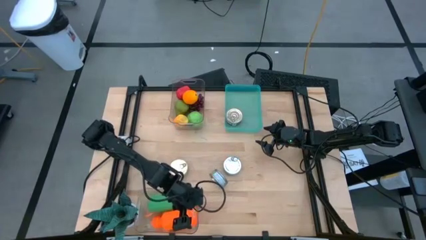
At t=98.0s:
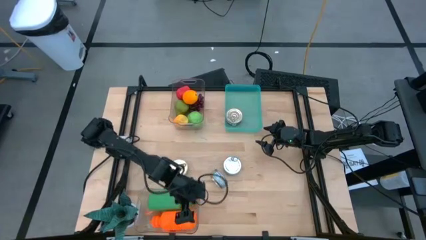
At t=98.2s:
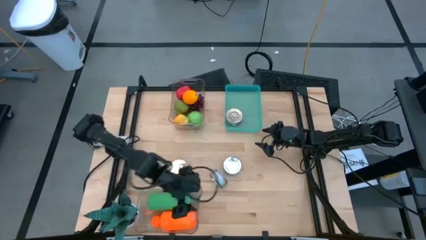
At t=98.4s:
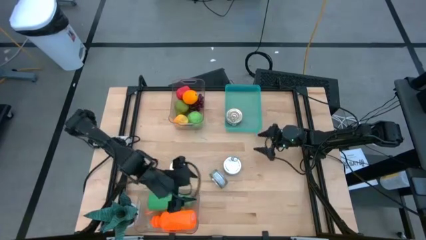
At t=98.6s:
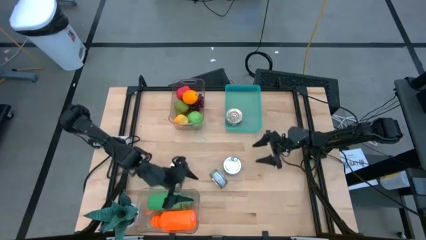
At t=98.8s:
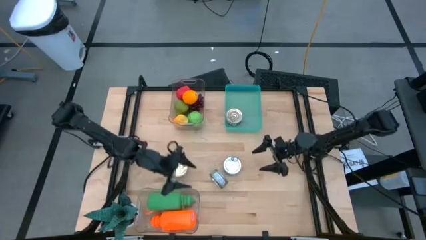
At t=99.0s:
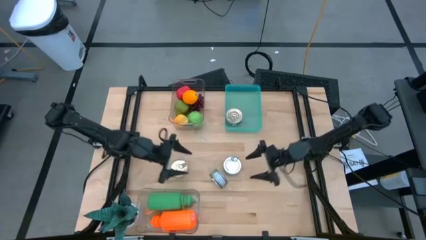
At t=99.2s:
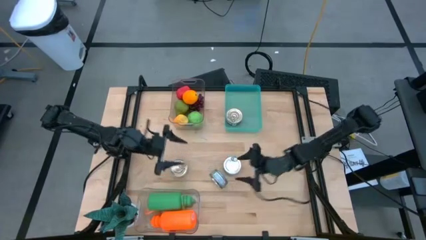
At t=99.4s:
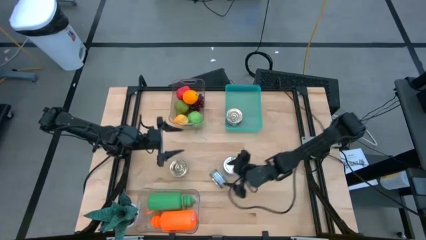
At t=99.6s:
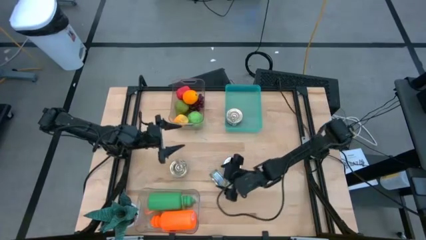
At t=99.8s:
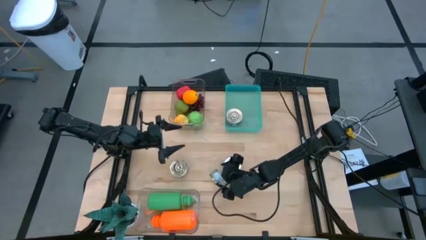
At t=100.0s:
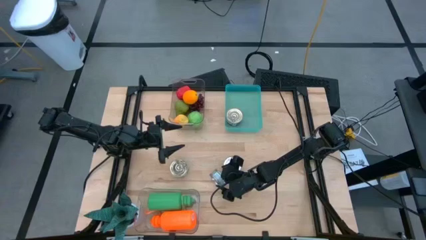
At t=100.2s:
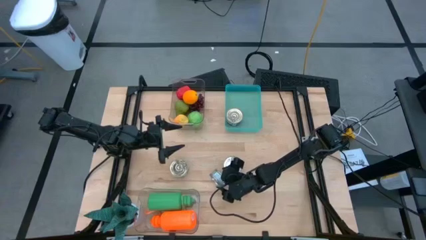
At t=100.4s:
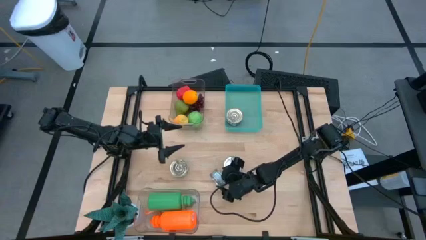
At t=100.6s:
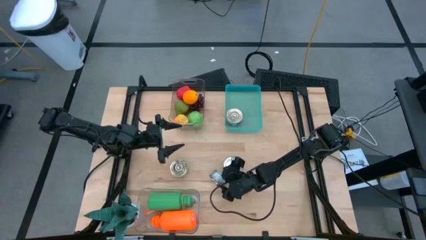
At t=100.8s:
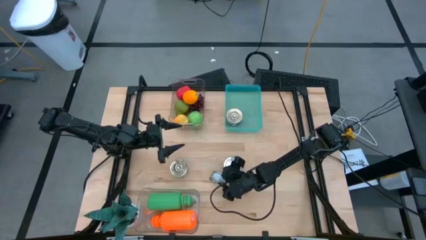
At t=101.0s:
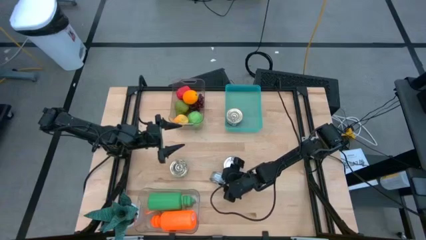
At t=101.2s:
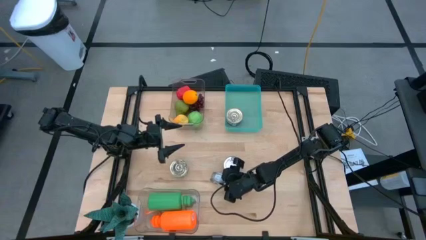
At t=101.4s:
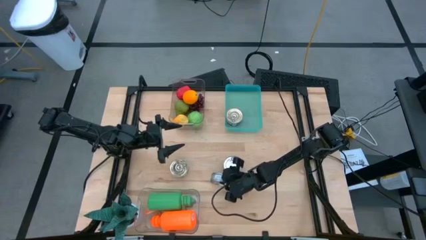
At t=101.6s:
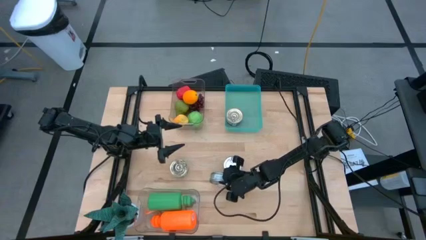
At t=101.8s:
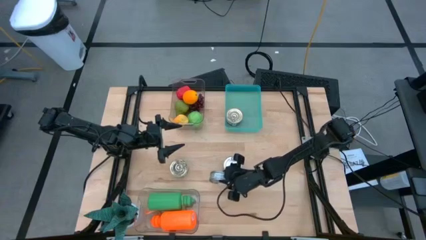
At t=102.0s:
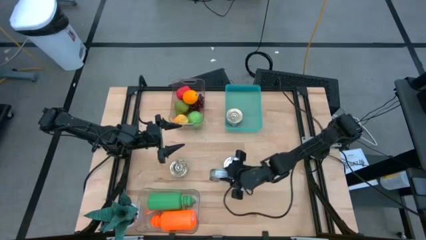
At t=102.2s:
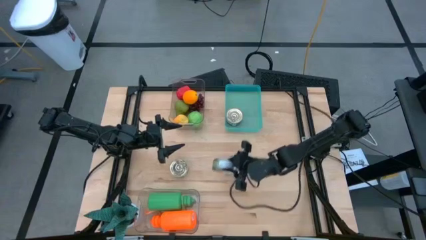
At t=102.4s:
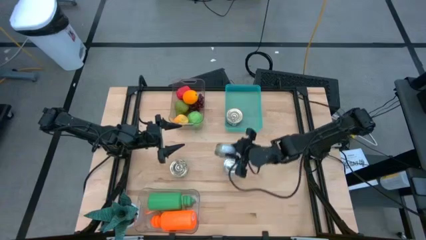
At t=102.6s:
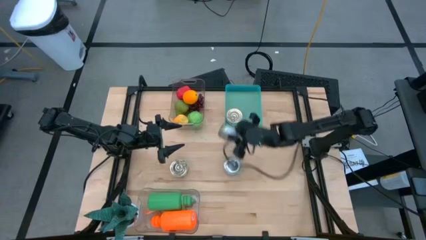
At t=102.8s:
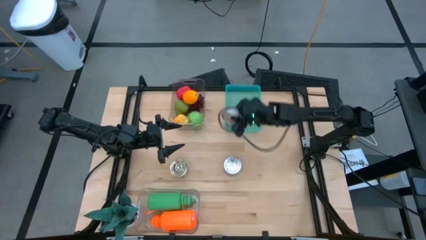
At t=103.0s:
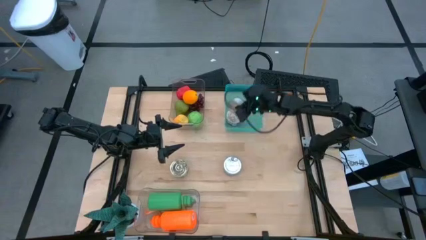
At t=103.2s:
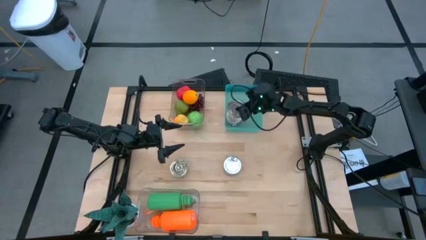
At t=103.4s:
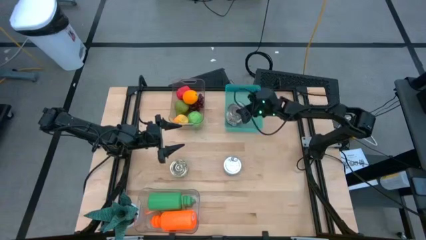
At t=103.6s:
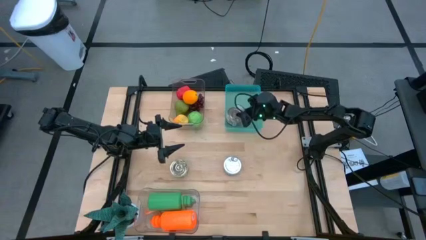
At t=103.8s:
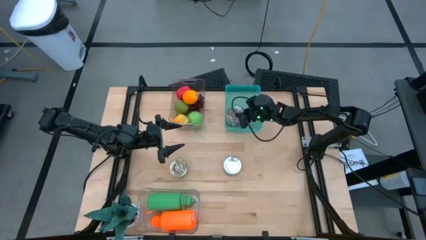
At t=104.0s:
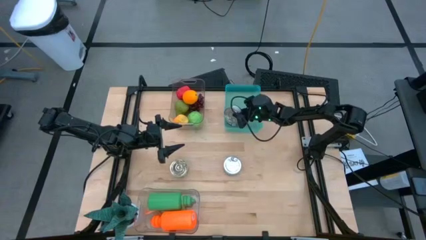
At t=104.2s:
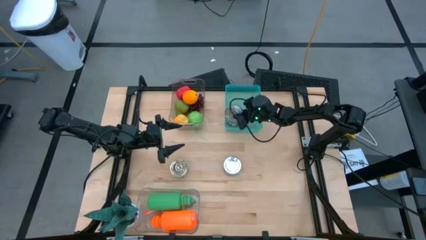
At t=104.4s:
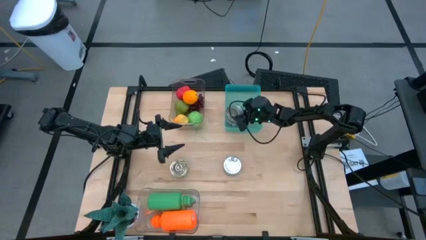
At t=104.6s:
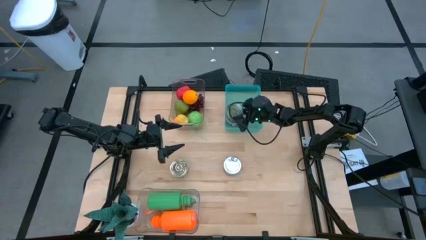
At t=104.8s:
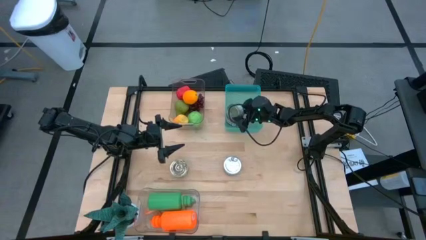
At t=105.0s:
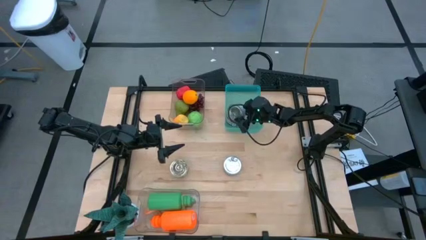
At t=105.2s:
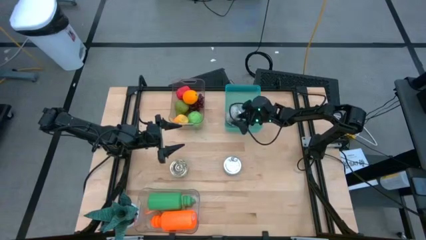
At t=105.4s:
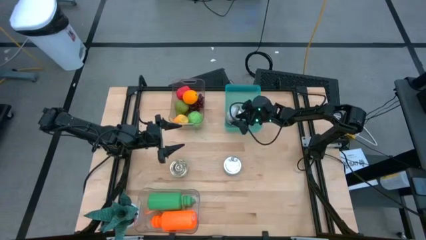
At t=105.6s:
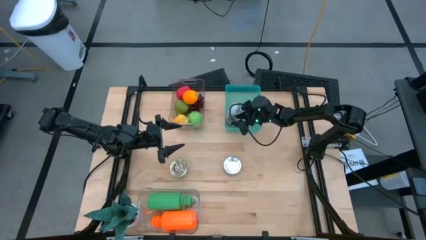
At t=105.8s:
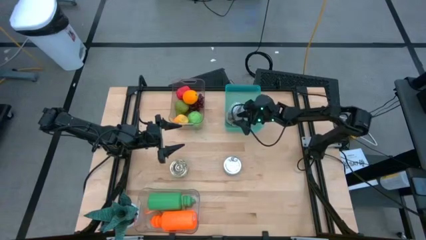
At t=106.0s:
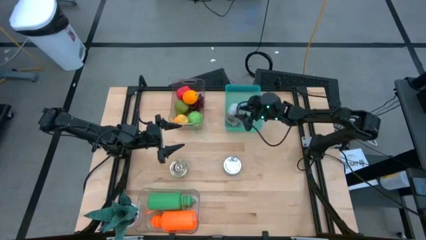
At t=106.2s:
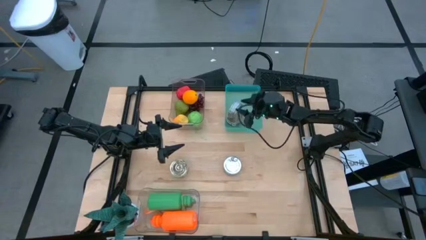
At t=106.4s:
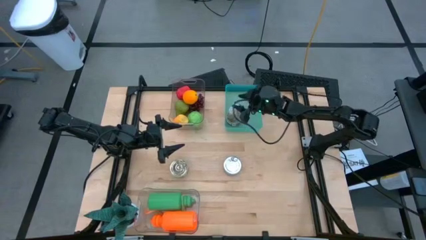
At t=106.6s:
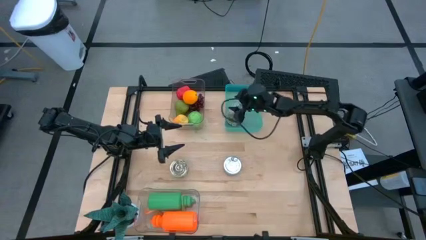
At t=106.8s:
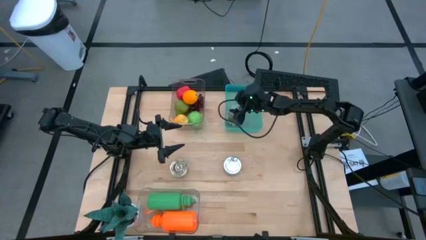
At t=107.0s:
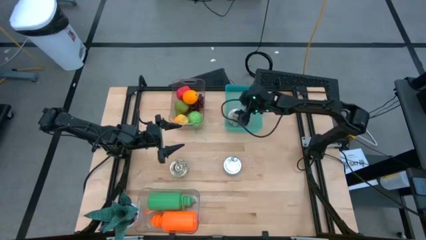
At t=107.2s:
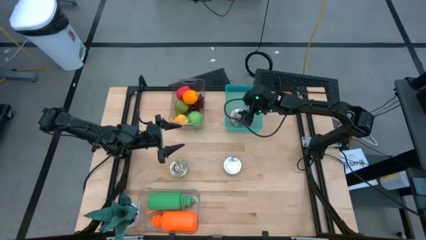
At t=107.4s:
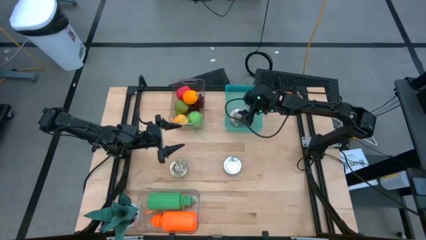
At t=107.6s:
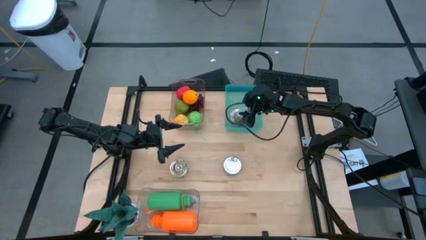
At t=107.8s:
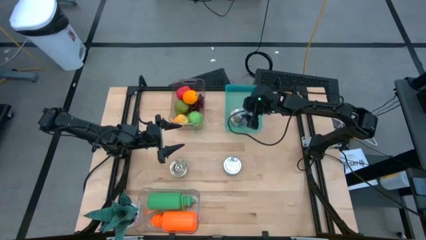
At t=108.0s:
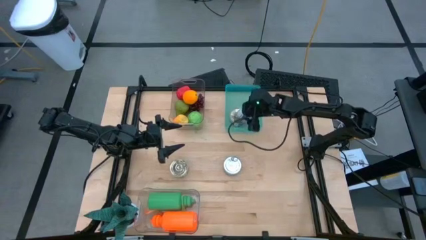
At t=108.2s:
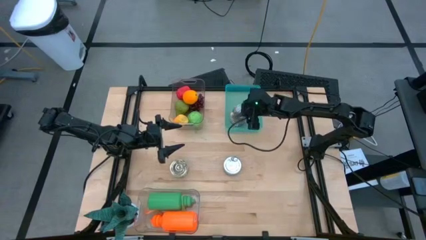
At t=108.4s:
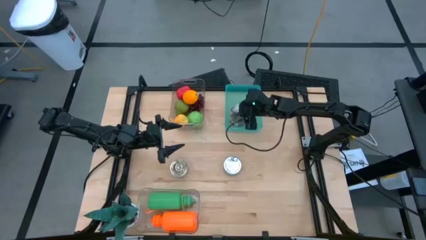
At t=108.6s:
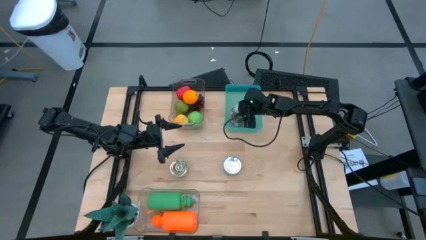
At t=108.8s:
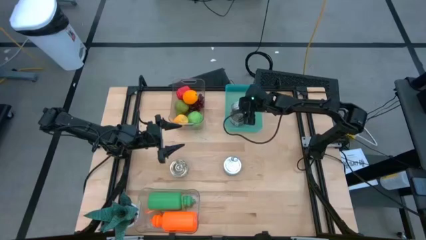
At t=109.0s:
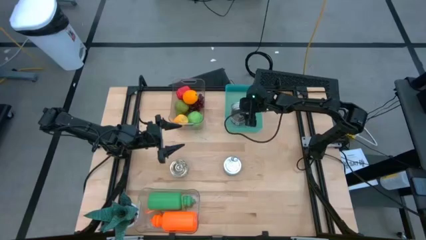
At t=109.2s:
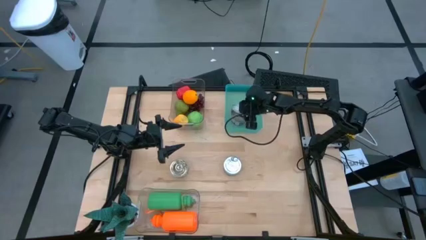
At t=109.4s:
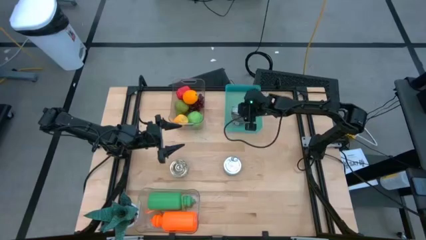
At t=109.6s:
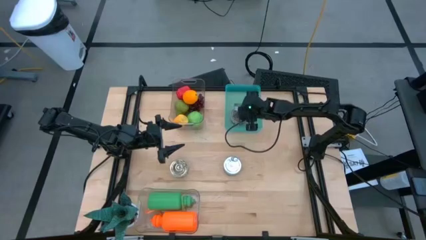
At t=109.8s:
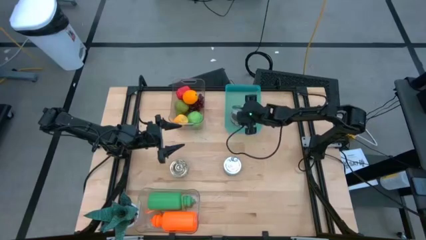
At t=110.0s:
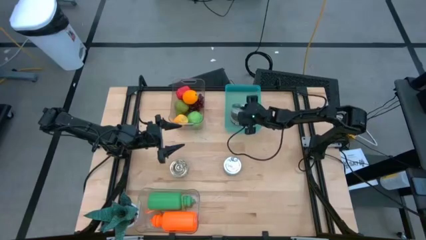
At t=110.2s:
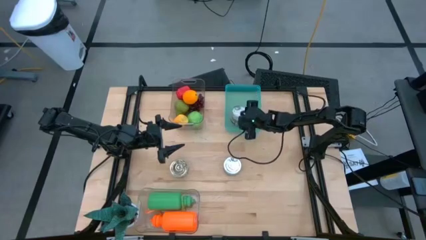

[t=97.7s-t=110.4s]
Task: Pick & Place Food Item
Put the bottom green tuna can into the light blue bin

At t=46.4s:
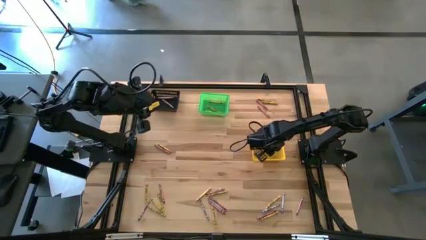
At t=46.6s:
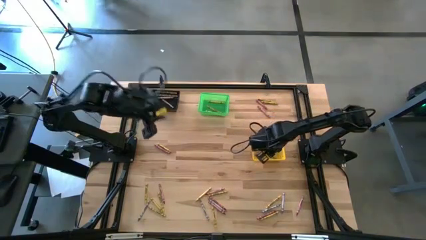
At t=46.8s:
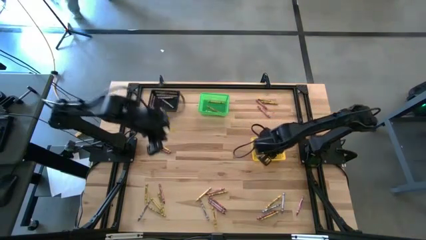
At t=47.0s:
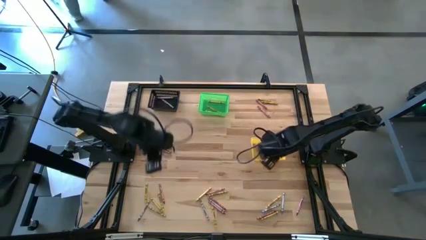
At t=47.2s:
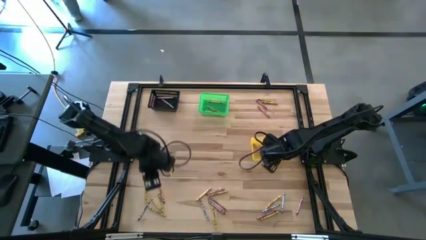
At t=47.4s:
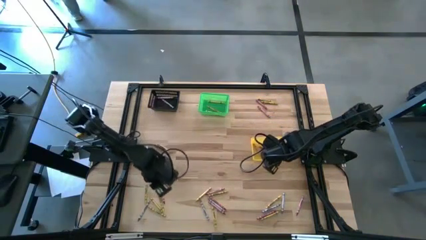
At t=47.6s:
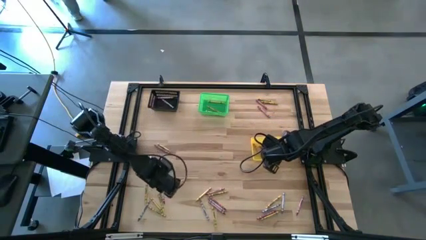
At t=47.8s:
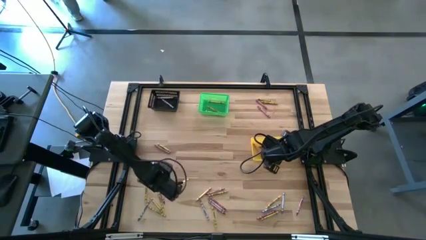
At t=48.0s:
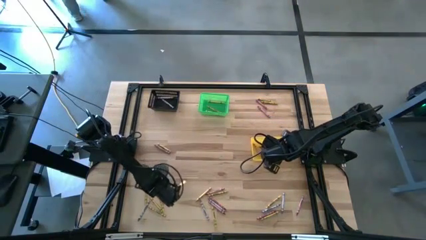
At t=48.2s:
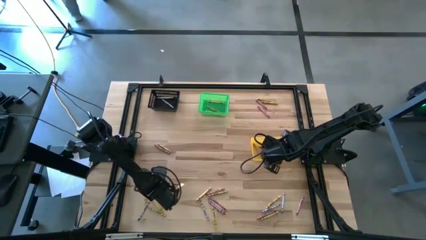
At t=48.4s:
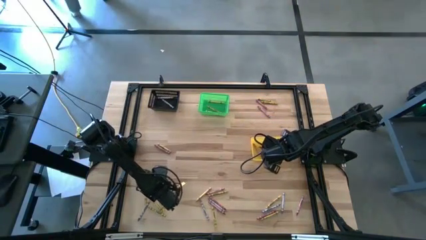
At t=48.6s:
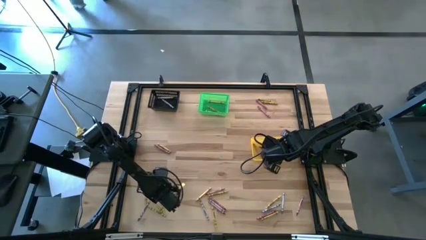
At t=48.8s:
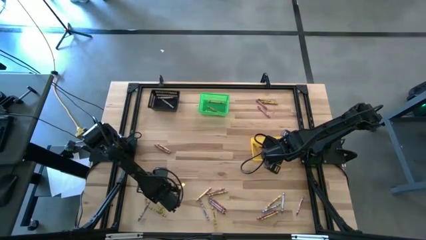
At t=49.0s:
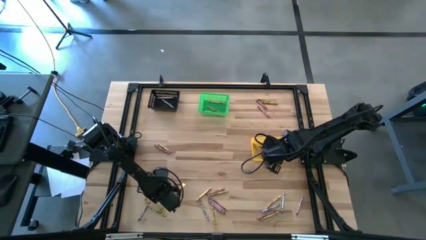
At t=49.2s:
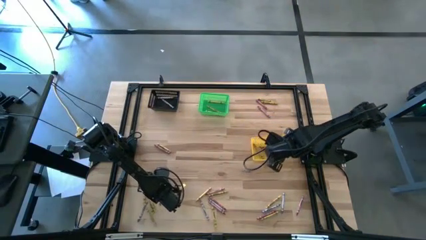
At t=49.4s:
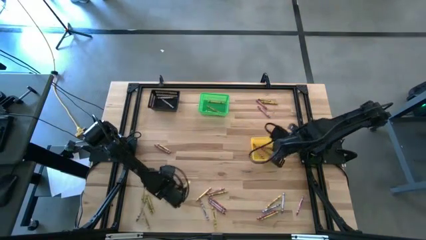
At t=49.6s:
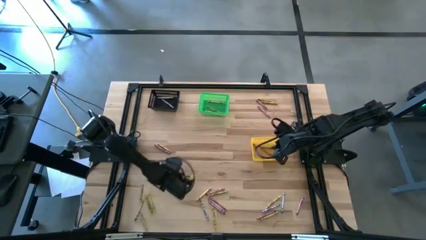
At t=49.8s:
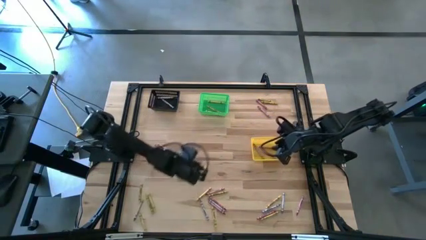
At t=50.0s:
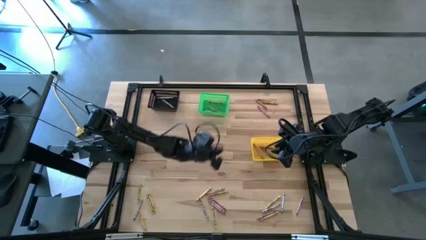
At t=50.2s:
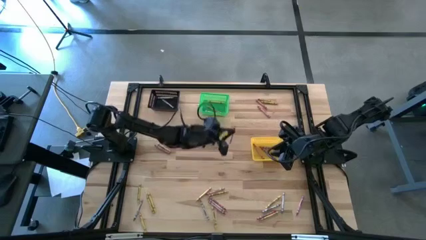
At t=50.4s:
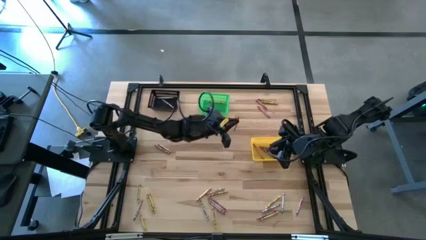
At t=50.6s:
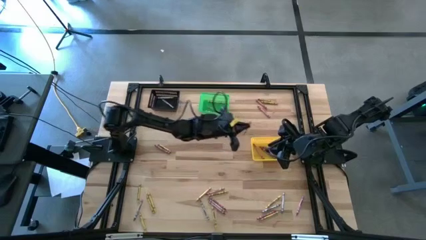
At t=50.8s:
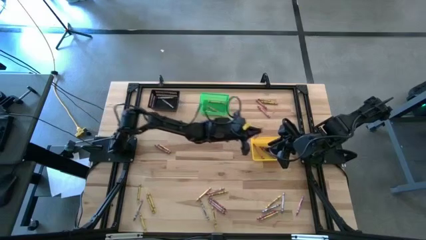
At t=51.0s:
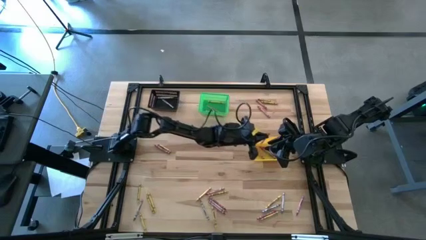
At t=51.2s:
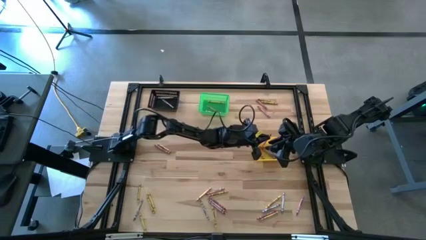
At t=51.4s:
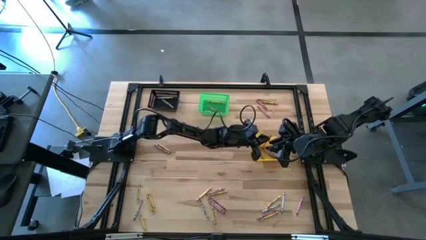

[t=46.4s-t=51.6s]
Task: Sort crayons
Put the red crayon into the yellow basket
